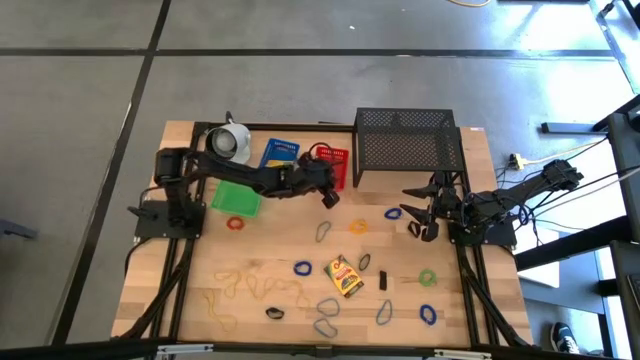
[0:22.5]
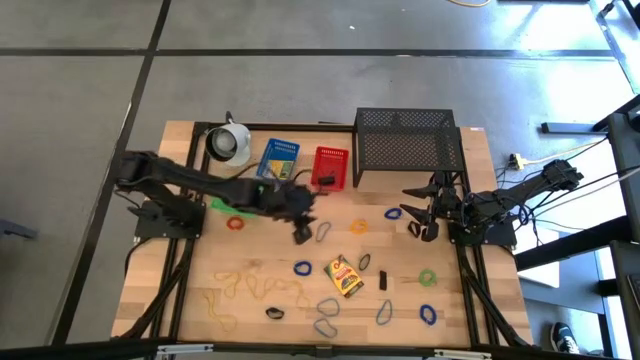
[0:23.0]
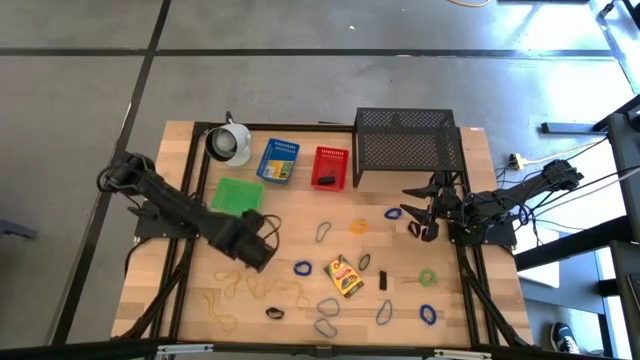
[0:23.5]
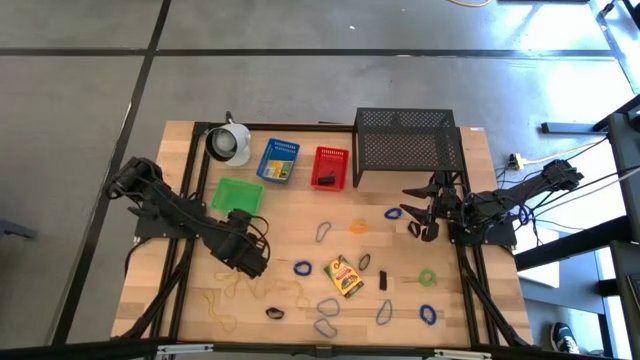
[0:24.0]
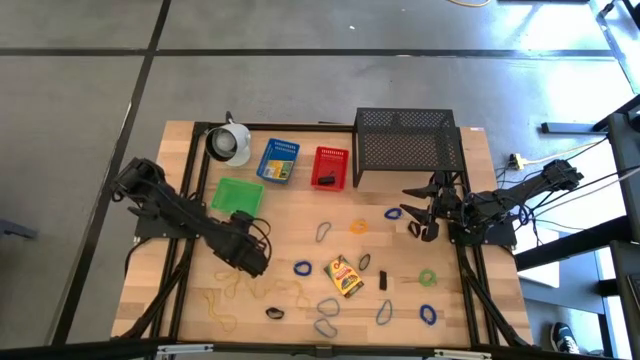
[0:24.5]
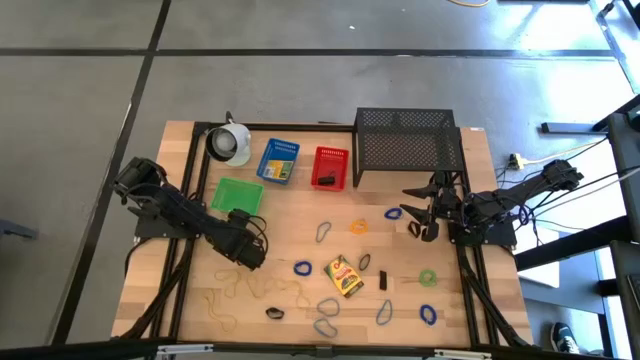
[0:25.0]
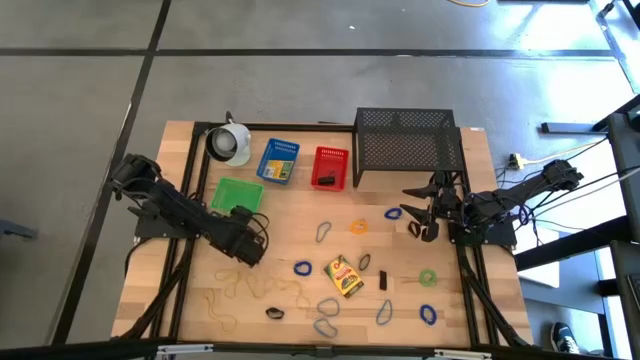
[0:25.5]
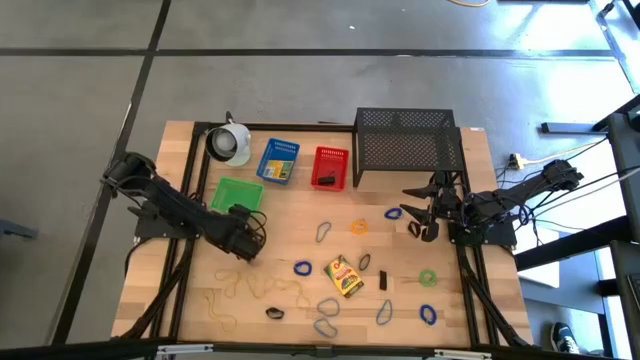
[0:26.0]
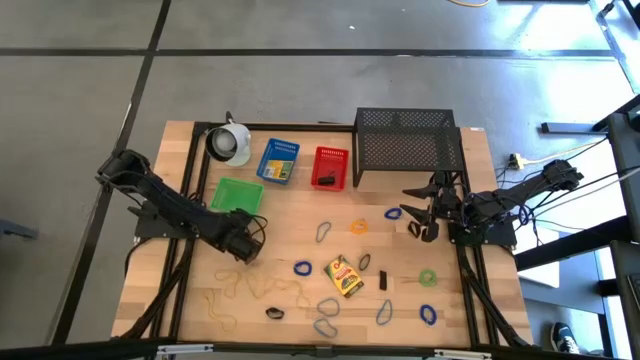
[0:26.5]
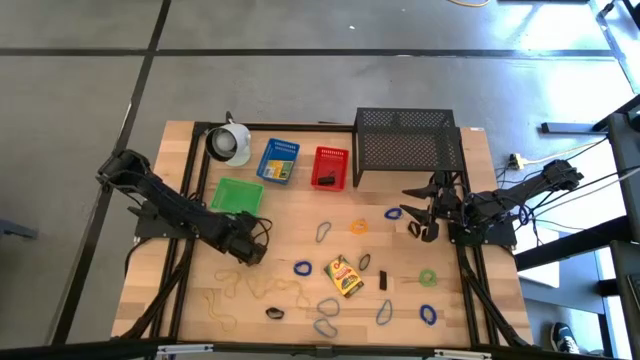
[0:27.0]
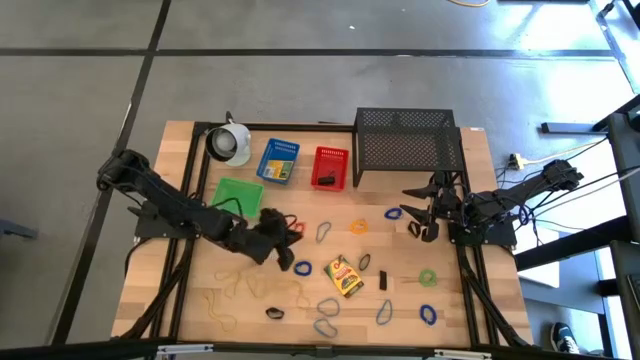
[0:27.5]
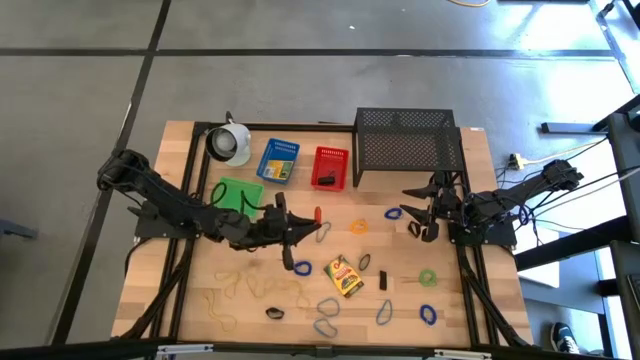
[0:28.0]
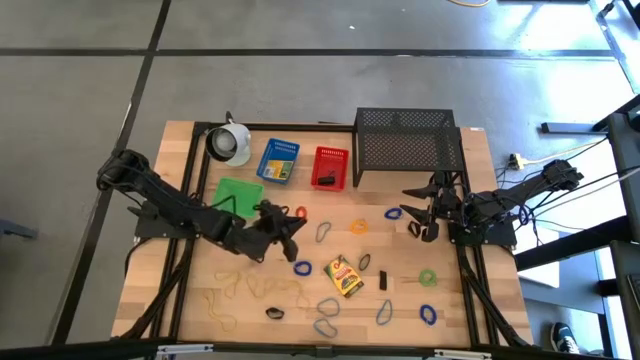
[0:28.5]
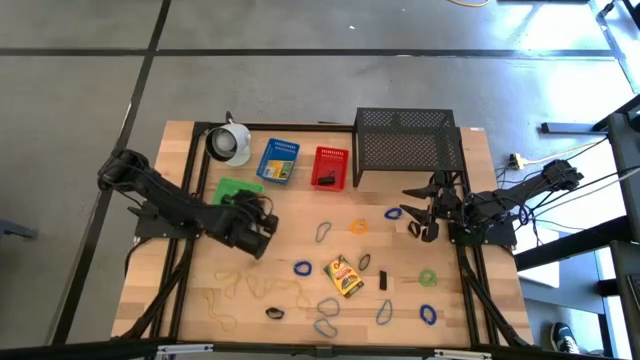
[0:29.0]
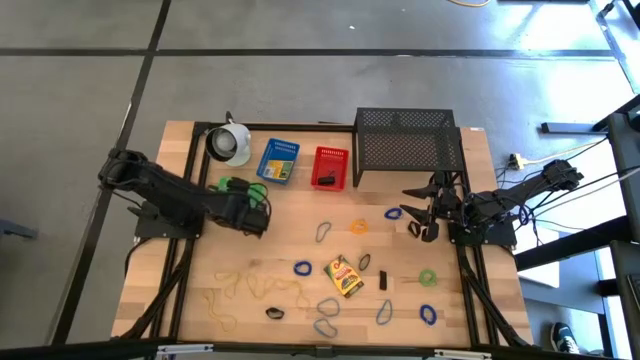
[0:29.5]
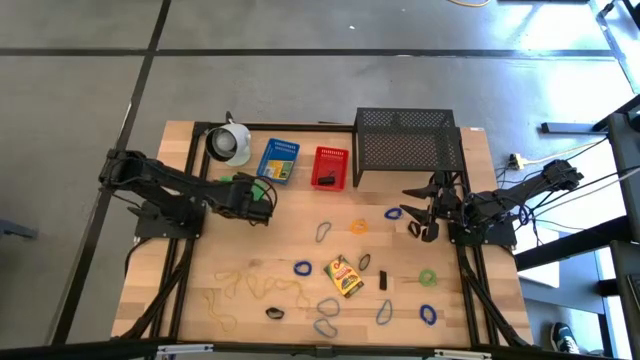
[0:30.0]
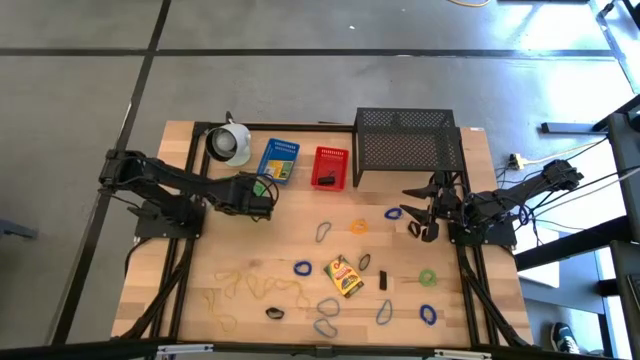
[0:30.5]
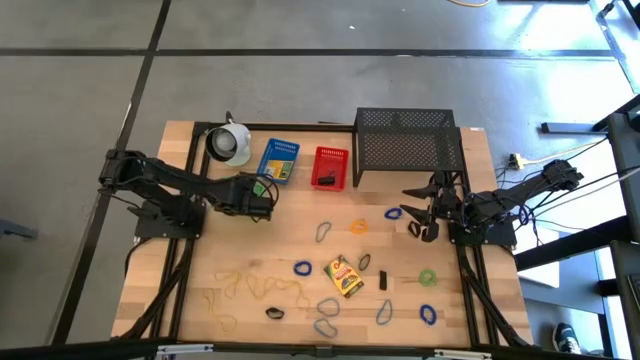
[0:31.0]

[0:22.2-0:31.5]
Task: Pick & Place Office Desk Supplies
Put the red spring keychain into the green bin

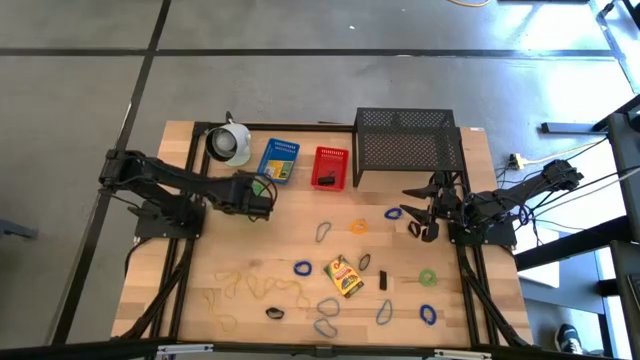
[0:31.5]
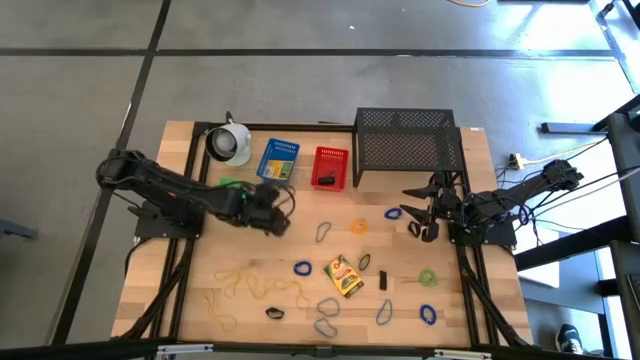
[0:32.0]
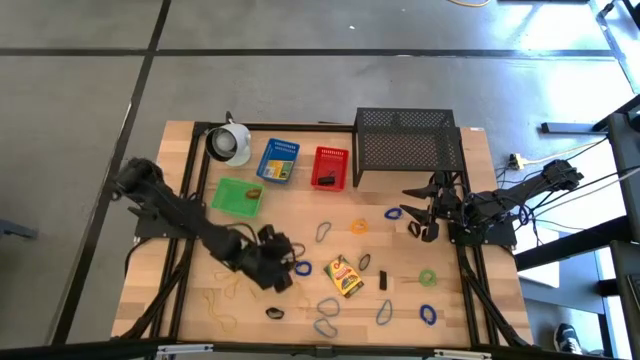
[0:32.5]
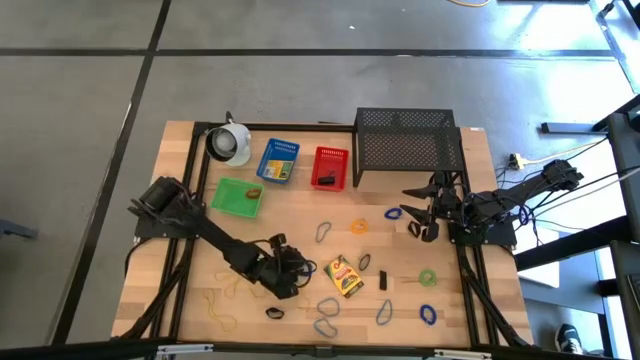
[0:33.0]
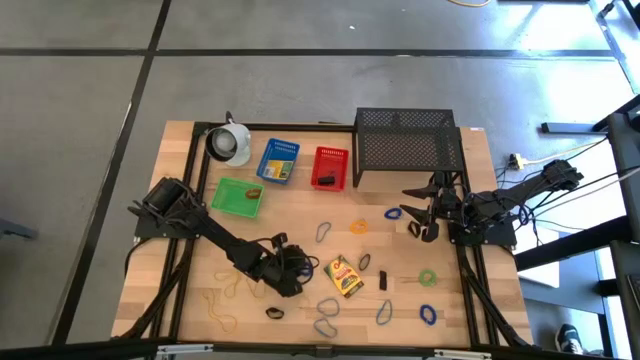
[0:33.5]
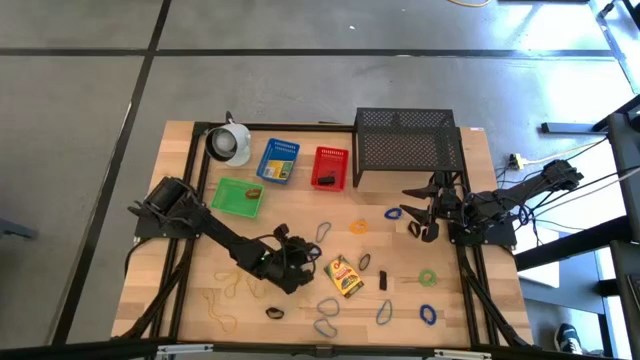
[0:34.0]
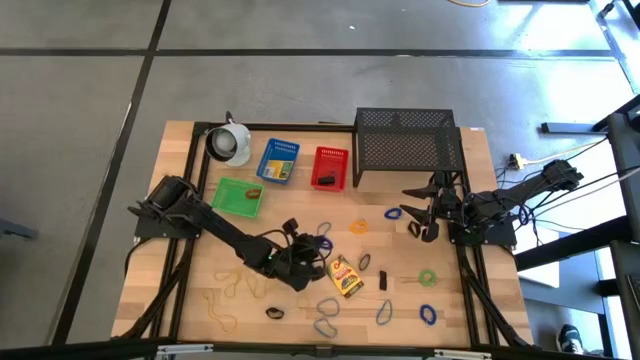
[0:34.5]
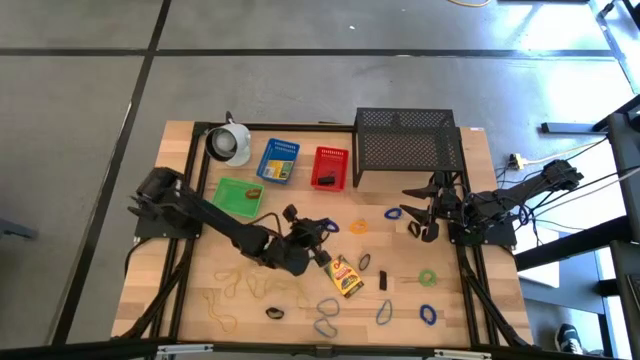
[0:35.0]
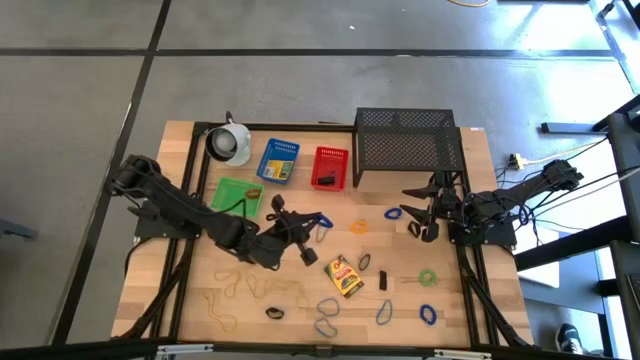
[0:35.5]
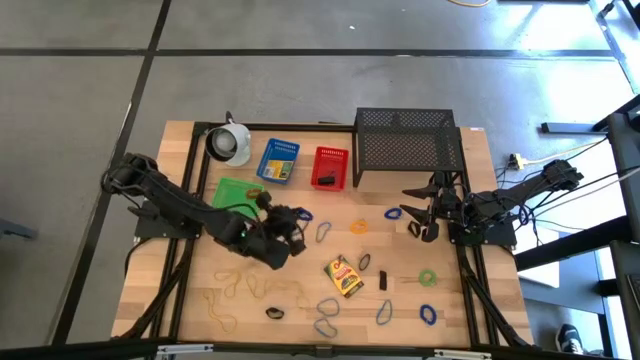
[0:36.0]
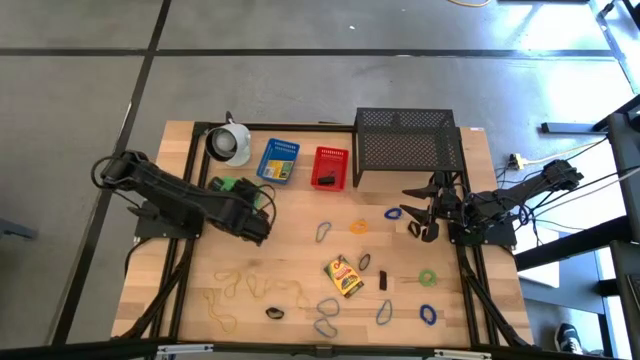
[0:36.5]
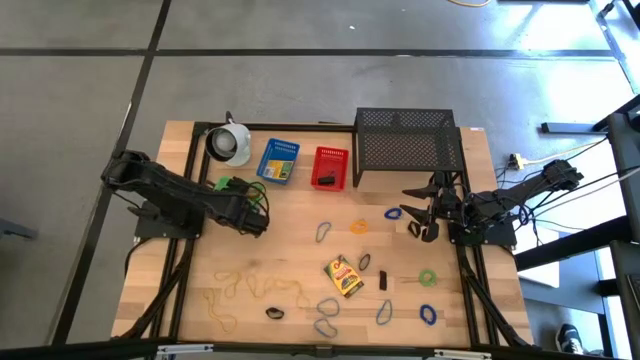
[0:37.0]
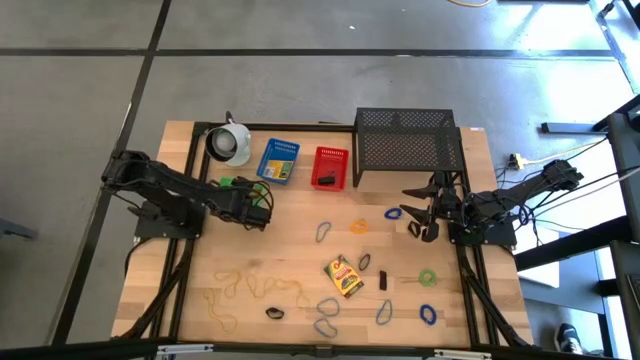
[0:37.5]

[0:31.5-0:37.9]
Put the blue spring keychain into the green bin

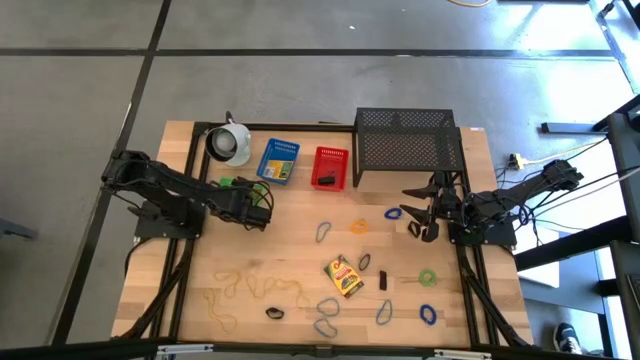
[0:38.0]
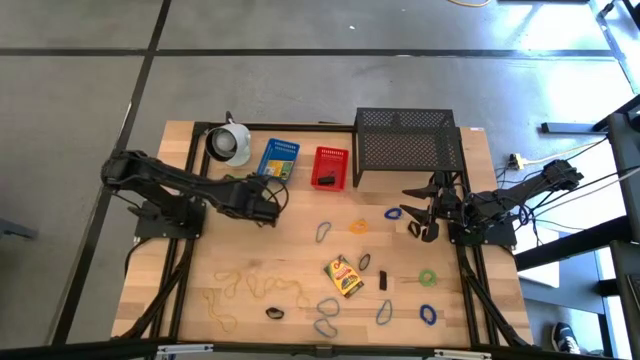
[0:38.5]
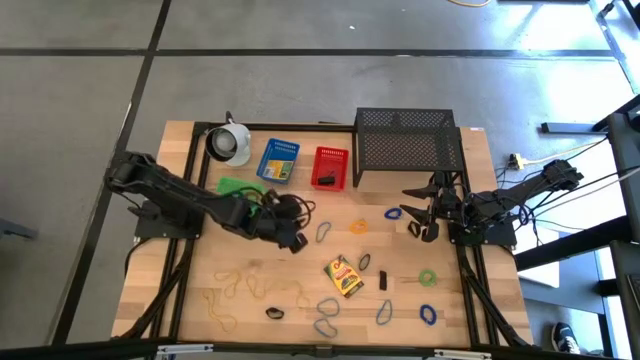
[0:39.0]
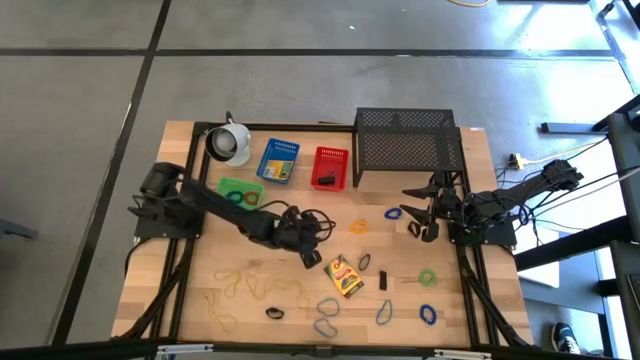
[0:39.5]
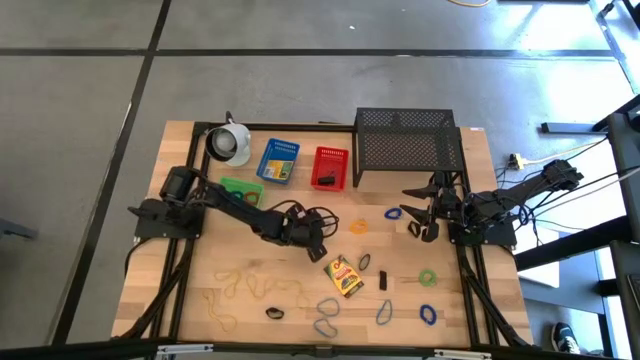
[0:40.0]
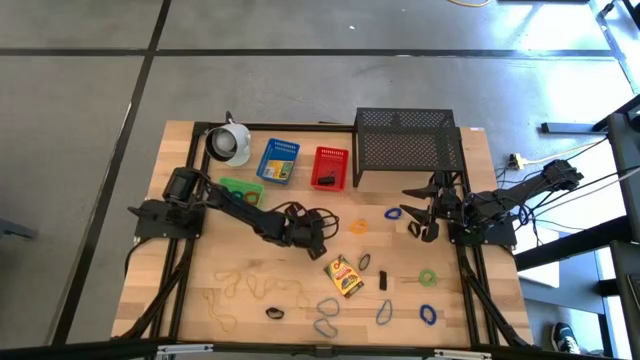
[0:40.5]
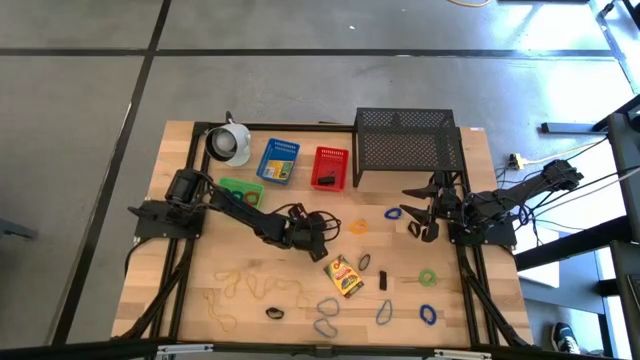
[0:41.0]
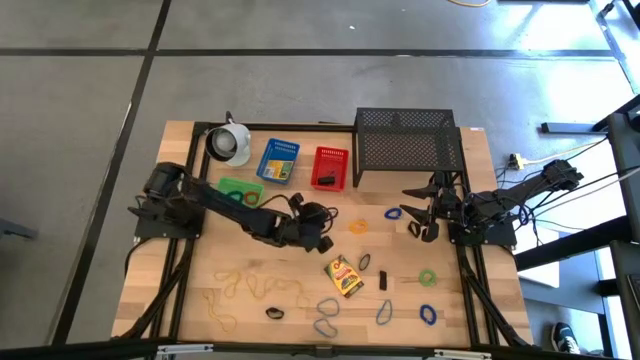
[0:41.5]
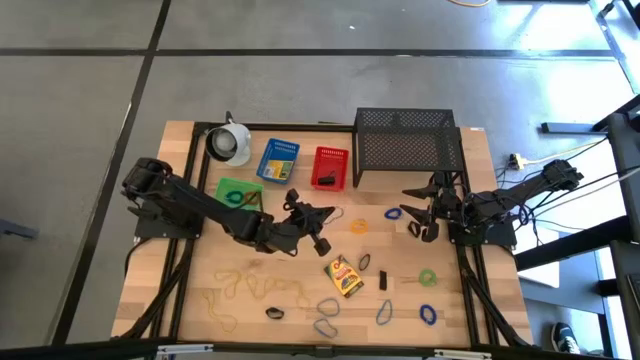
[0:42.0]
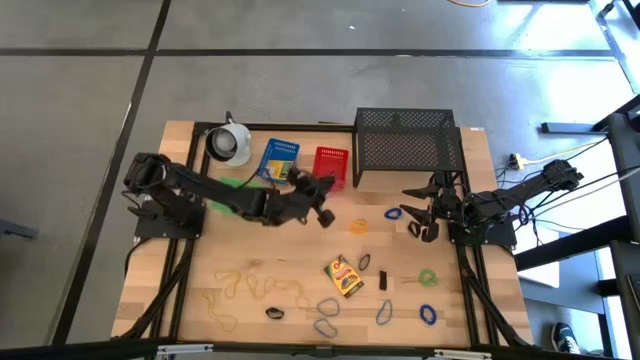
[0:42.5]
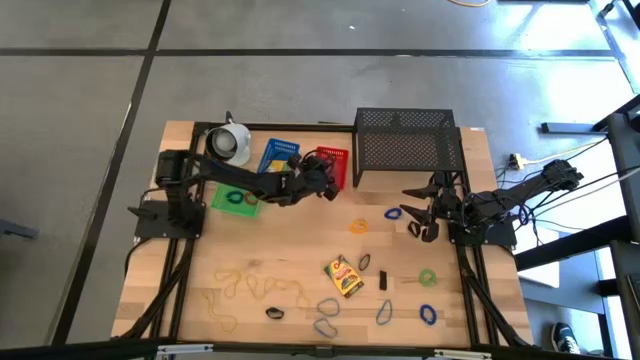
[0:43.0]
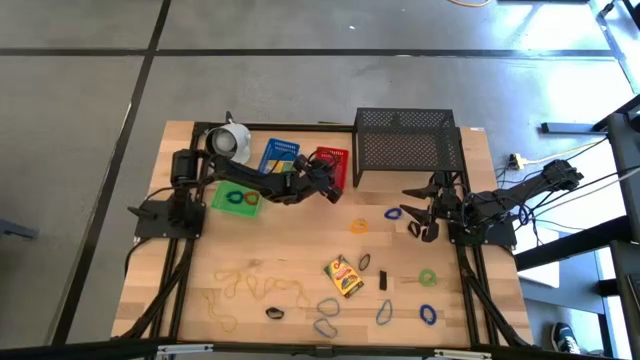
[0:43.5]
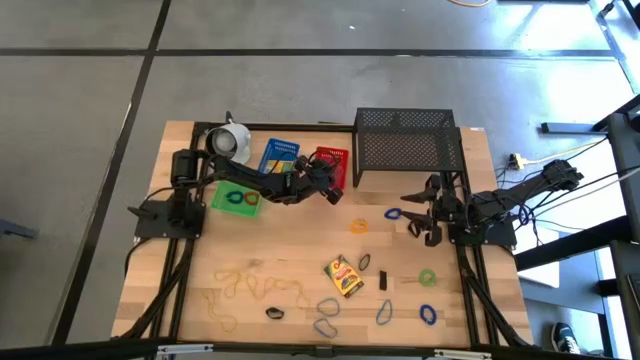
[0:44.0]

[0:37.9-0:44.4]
Put the blue rubber band into the red bin
